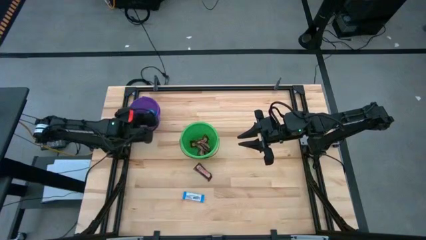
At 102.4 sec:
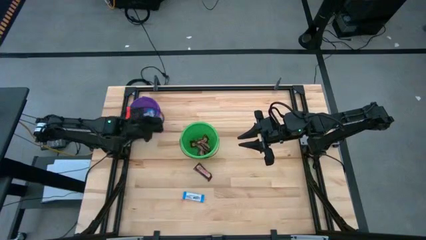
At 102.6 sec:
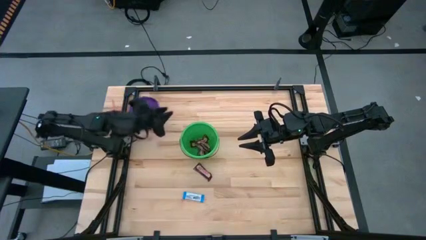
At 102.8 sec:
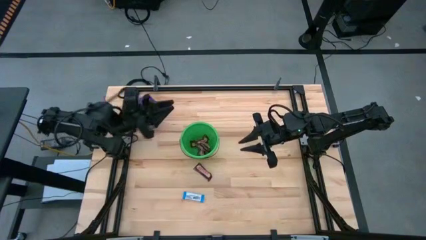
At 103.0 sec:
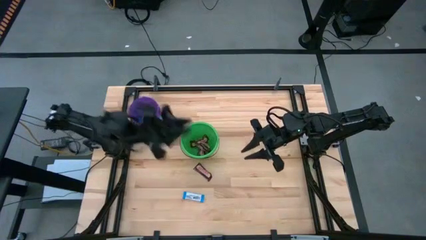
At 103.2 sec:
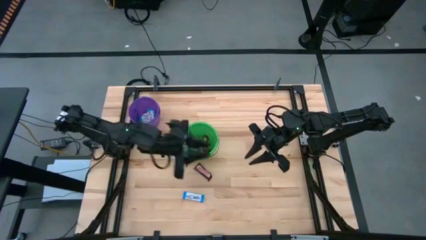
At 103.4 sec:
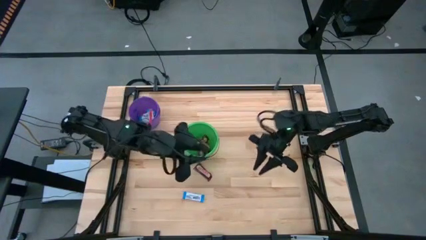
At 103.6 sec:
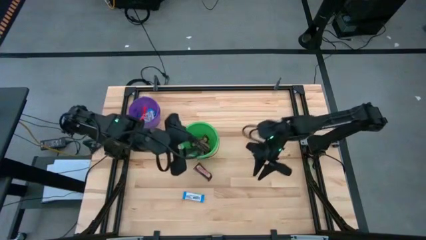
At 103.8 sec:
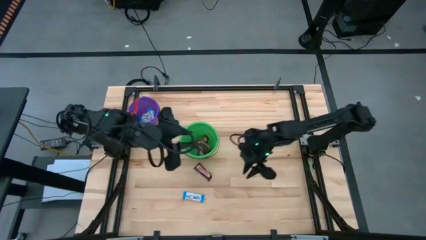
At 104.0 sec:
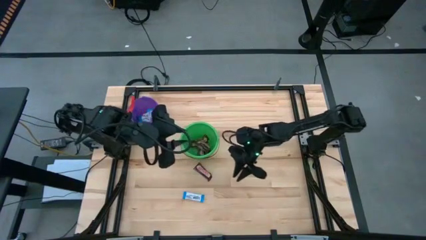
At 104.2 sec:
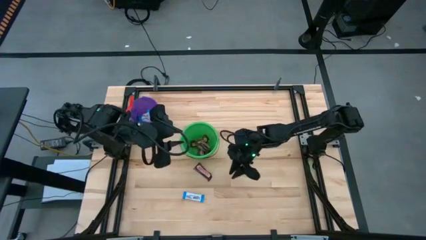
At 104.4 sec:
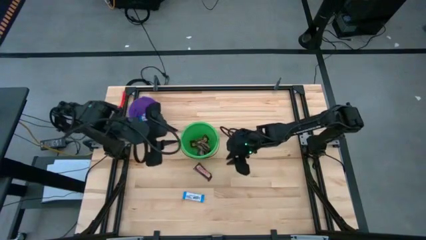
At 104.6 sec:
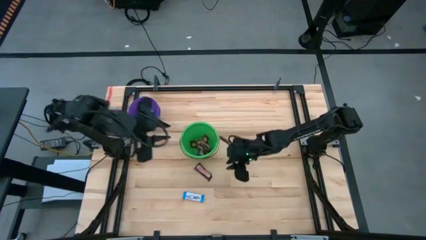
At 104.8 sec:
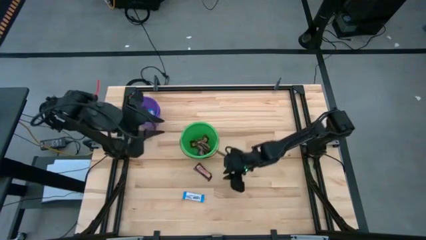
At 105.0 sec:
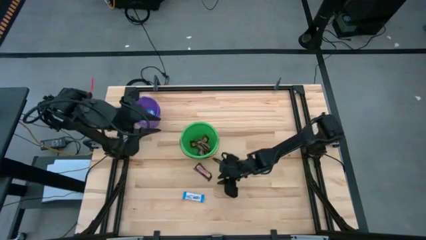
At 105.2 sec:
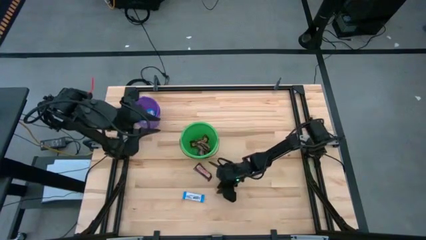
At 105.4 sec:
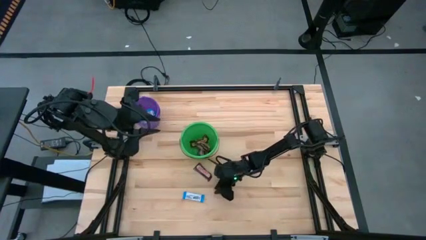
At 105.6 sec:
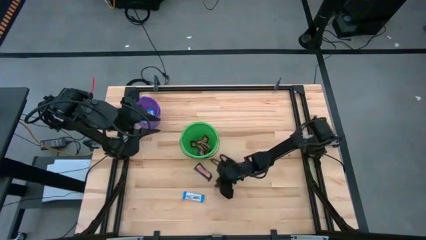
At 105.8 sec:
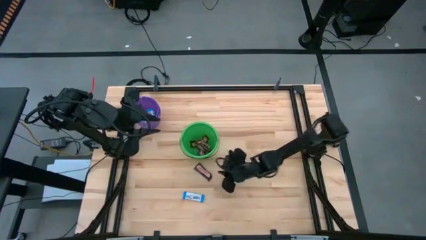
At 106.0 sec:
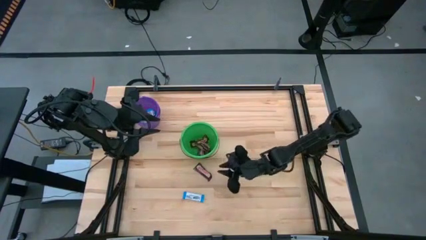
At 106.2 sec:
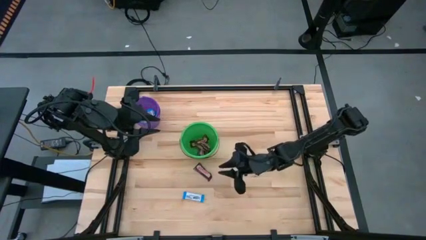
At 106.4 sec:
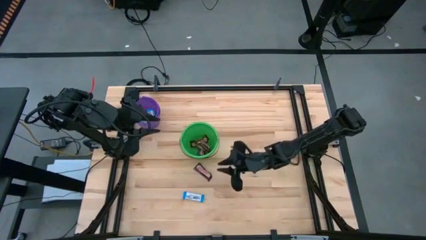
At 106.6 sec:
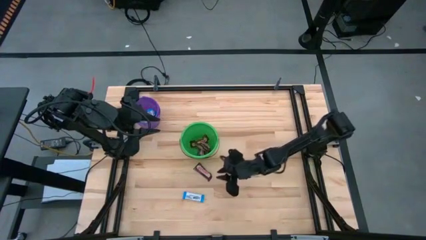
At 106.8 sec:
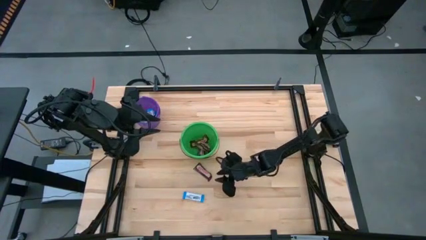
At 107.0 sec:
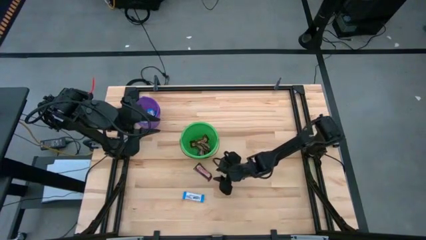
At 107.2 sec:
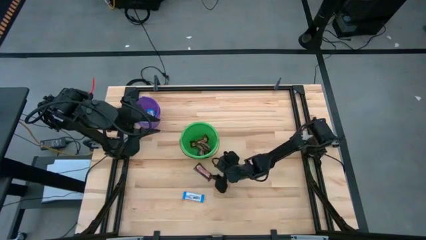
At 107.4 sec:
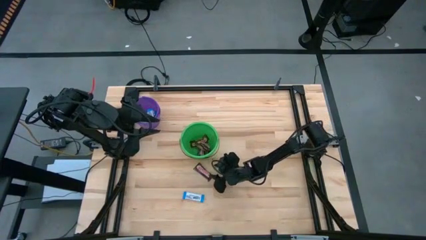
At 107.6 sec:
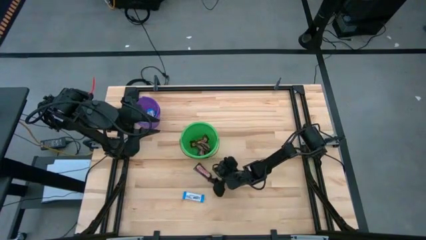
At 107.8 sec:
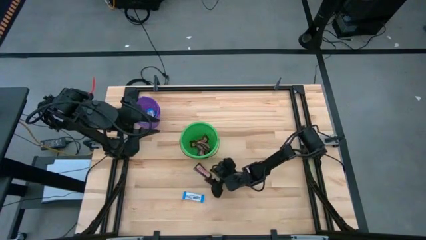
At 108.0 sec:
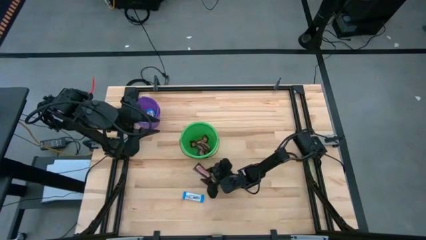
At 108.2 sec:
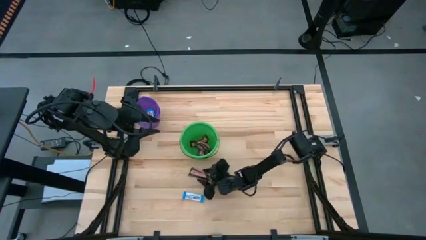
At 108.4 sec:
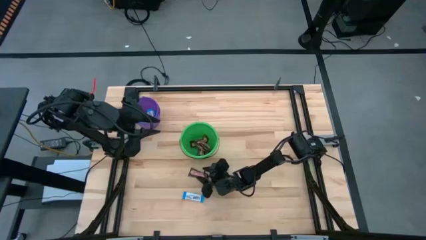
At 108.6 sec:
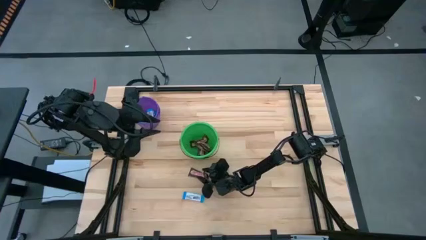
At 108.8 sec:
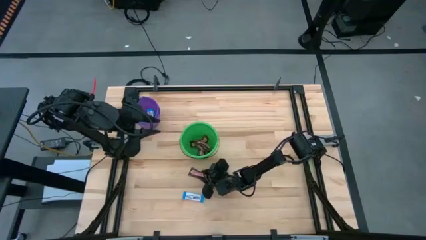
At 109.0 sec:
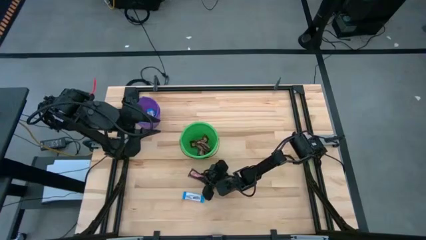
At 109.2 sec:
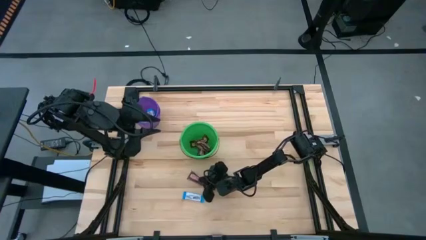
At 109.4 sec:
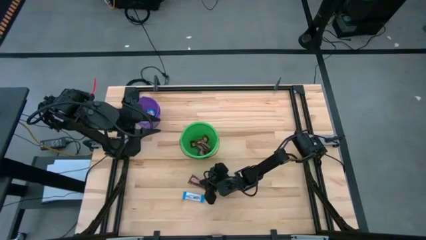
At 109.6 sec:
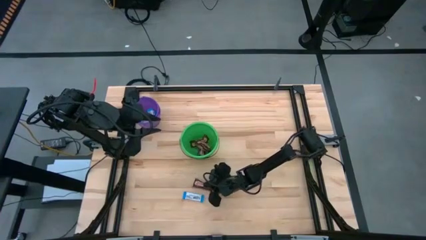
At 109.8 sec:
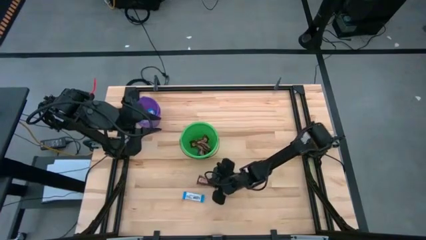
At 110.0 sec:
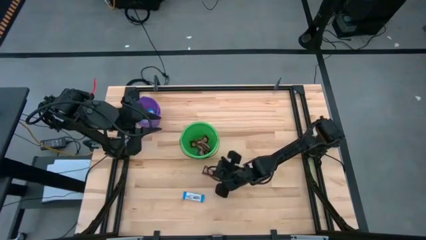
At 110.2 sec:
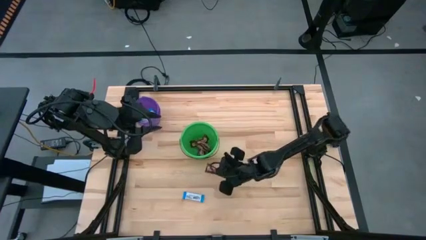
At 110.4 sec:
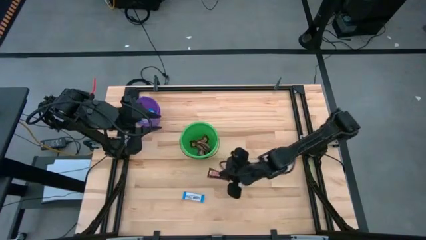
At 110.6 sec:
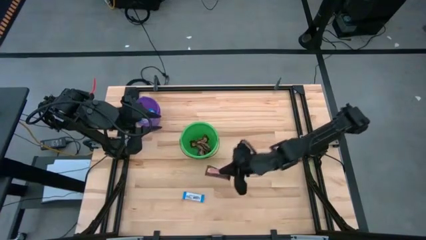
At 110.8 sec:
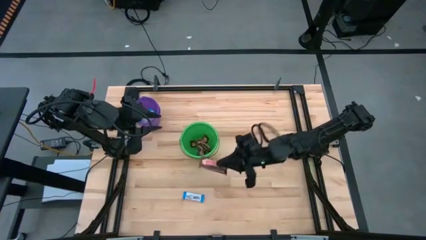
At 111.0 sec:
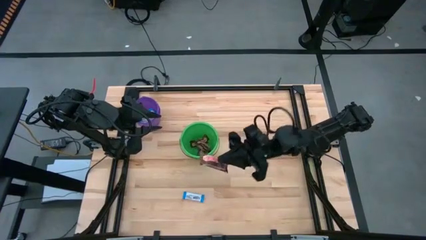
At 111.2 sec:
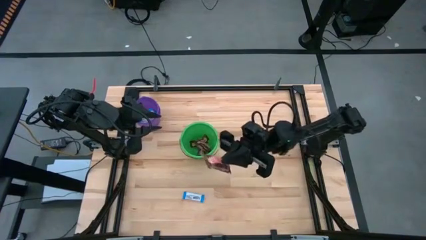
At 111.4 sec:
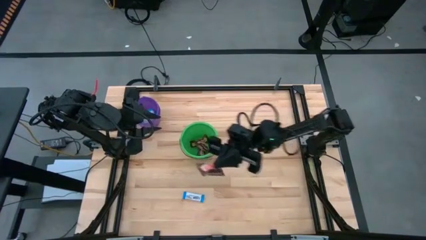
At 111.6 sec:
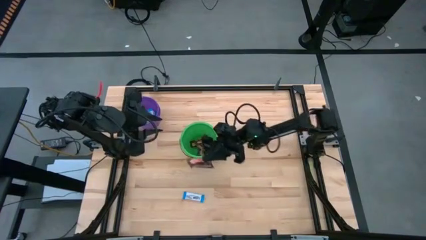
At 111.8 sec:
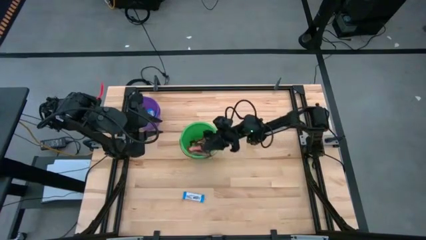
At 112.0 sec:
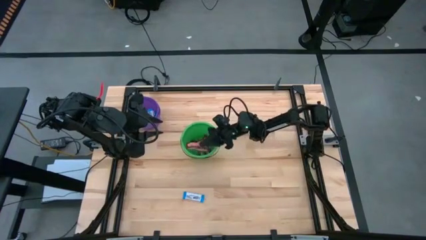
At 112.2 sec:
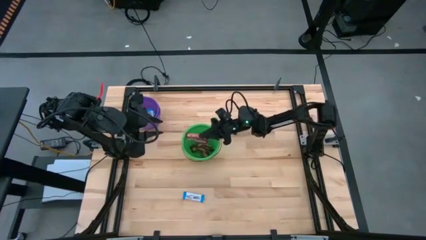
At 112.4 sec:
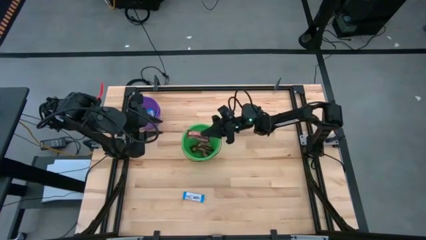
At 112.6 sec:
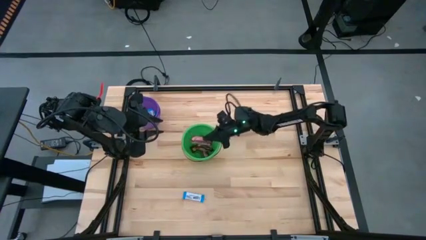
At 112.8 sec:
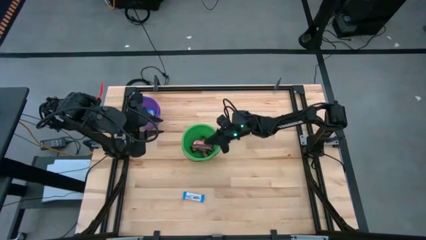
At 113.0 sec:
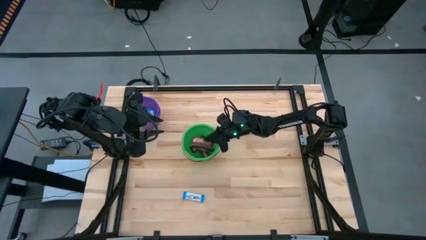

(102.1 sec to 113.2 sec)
Task: Sort candy by brand, put in halloween buckets
Put the black chocolate bar into the green bucket

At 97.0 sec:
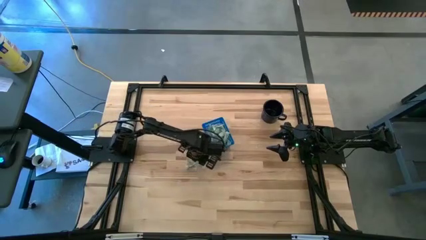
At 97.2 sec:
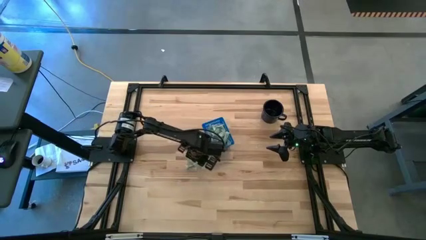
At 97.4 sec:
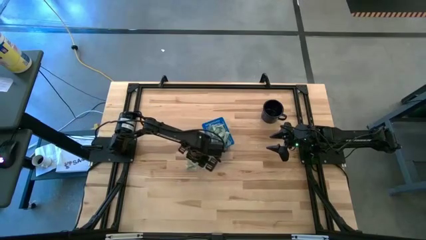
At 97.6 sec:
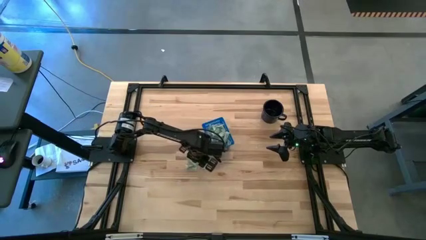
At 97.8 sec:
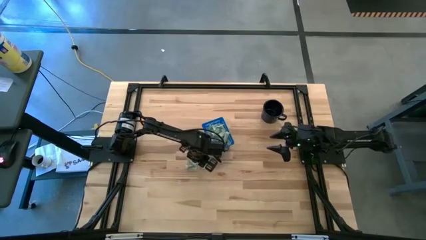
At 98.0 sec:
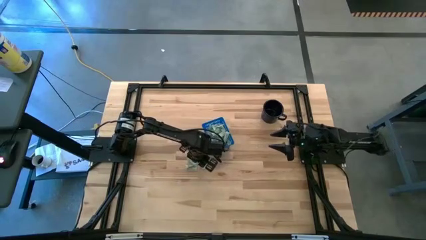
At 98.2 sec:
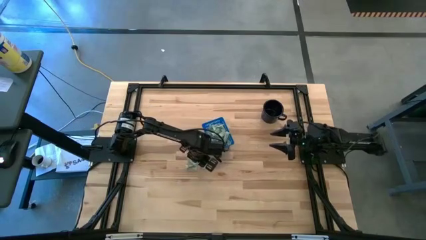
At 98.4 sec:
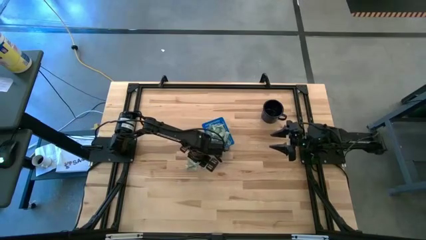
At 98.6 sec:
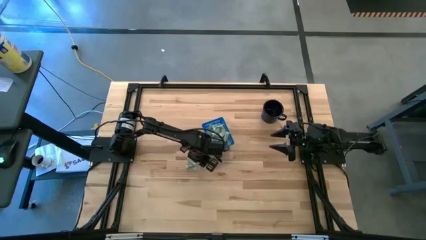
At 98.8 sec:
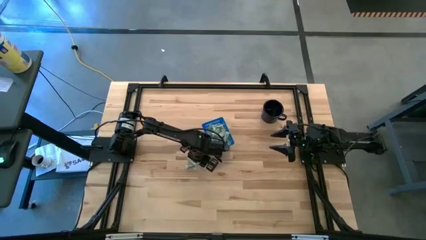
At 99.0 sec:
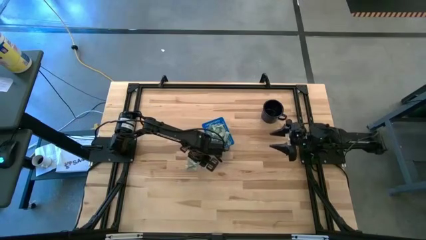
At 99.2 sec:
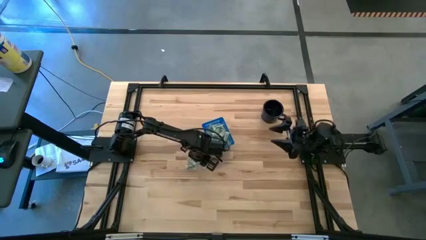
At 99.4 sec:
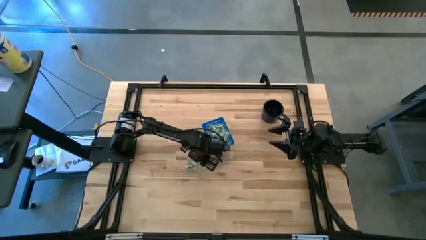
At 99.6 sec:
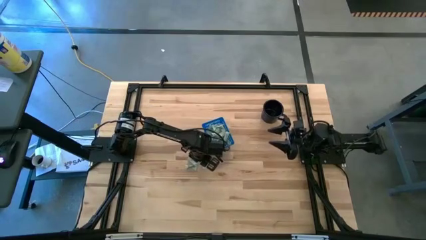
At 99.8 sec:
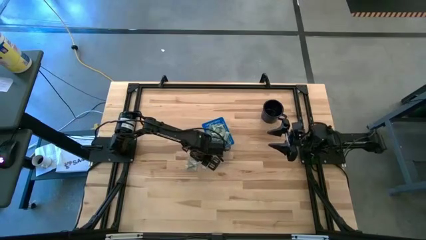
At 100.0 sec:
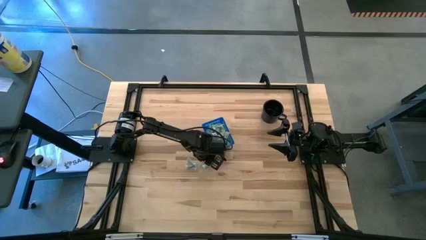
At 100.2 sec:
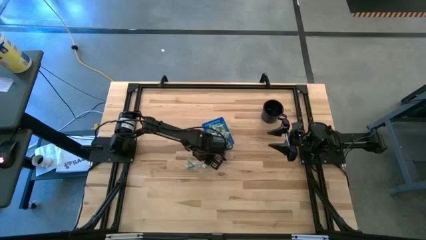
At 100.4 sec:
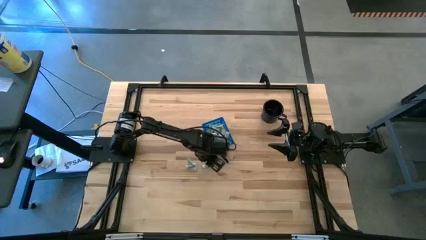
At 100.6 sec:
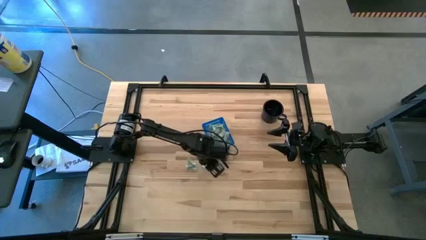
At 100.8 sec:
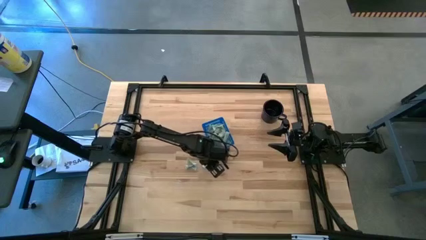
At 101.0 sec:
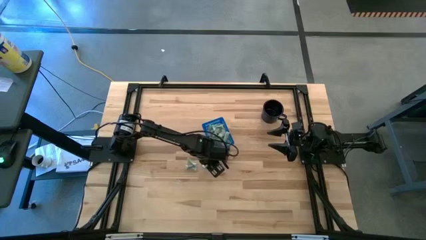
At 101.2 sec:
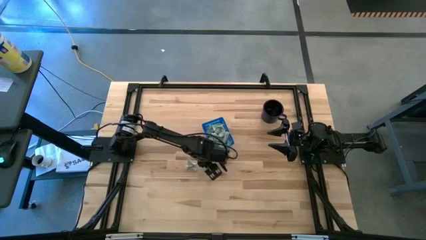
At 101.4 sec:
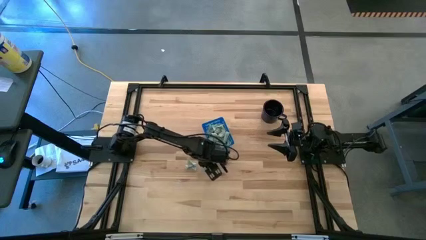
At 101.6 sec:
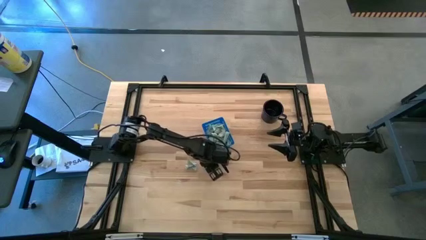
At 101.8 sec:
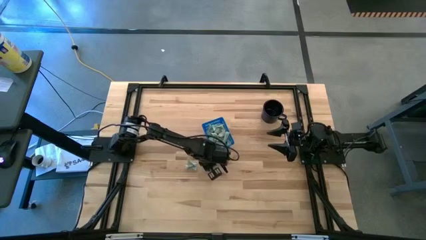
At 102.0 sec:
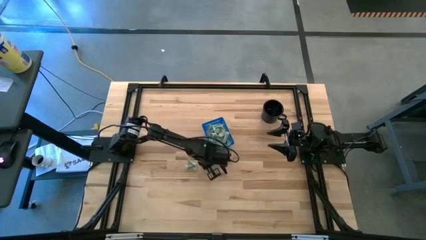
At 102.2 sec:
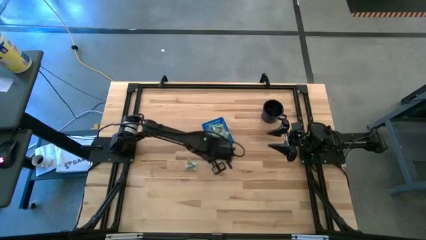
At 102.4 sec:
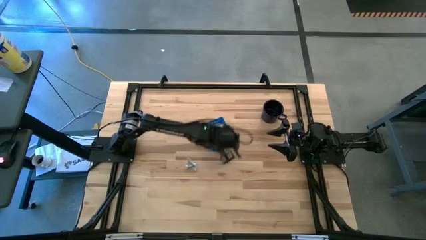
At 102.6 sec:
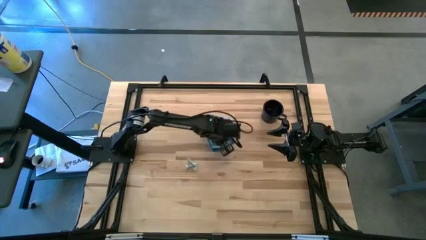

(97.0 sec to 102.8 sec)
Task: Pick and place Stevia / Truvia into bins
Put the stevia packet into the basket
